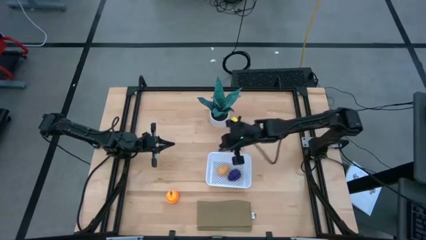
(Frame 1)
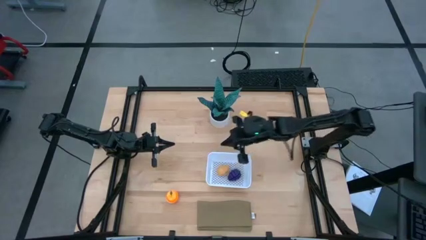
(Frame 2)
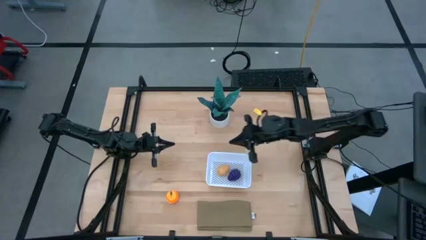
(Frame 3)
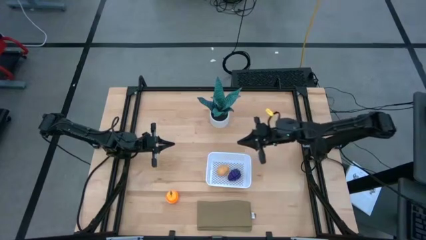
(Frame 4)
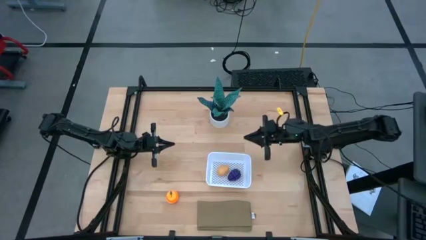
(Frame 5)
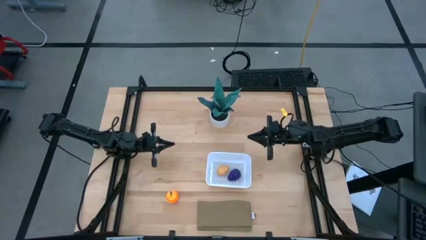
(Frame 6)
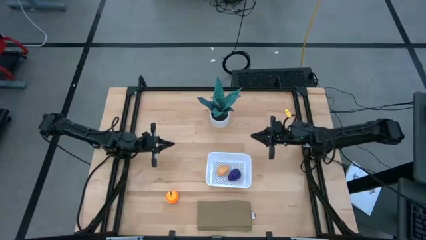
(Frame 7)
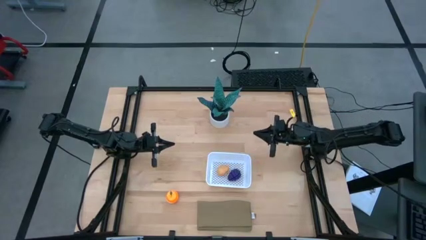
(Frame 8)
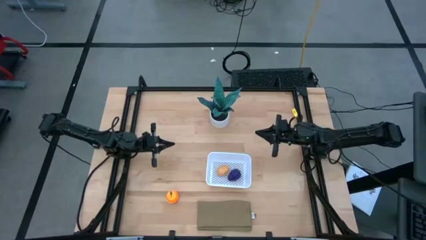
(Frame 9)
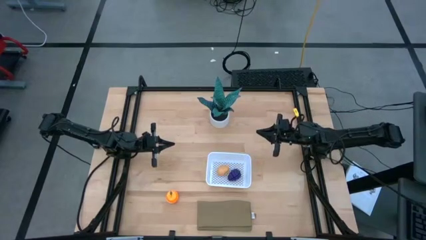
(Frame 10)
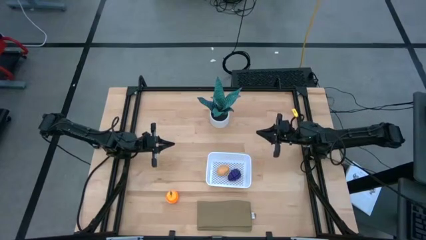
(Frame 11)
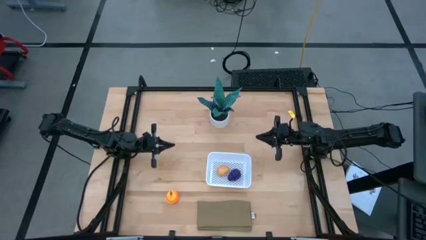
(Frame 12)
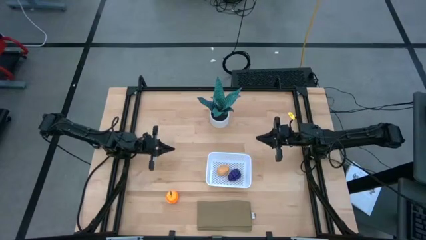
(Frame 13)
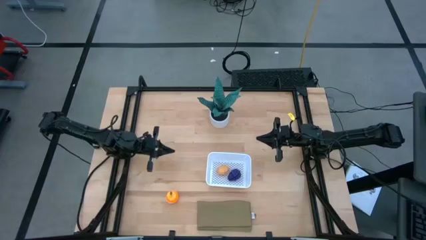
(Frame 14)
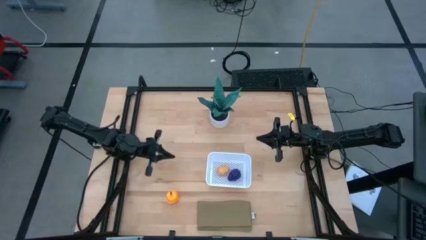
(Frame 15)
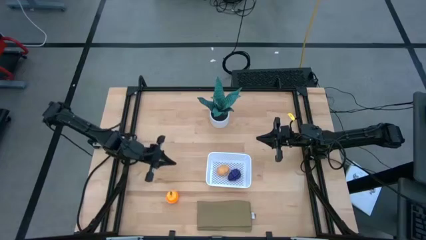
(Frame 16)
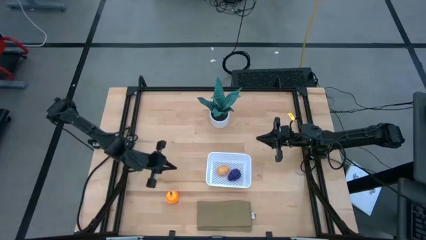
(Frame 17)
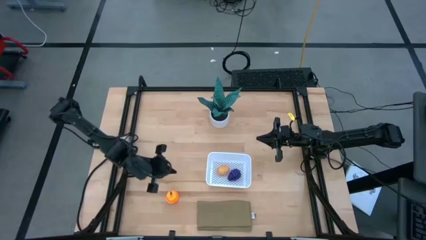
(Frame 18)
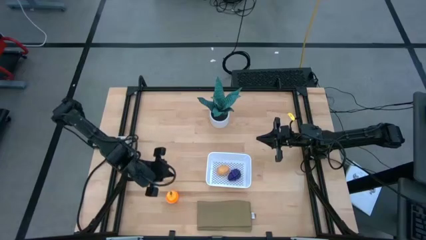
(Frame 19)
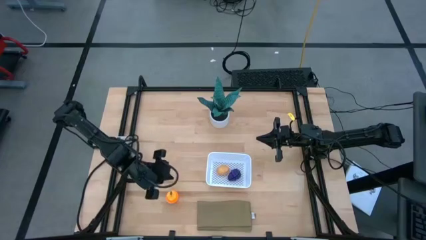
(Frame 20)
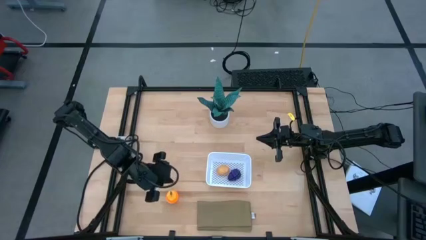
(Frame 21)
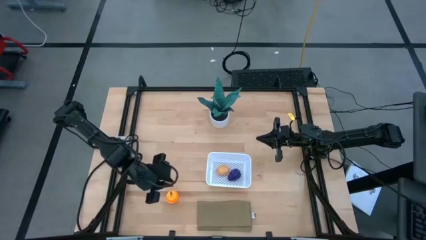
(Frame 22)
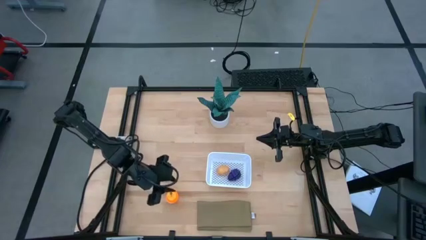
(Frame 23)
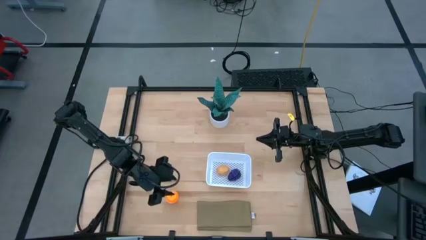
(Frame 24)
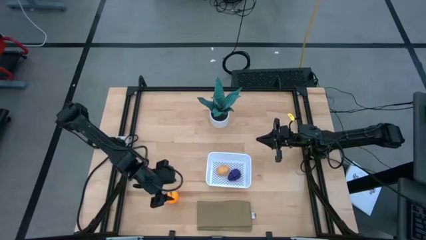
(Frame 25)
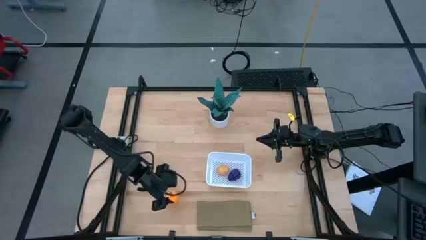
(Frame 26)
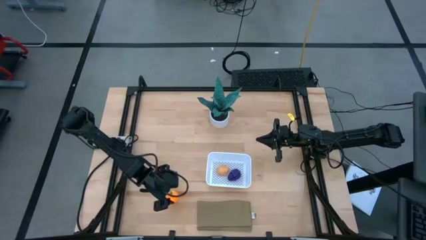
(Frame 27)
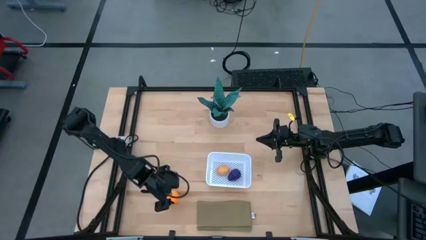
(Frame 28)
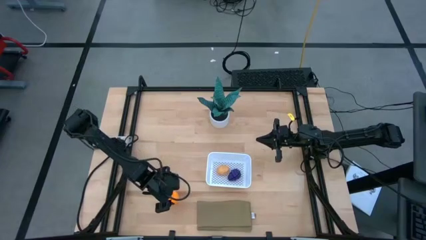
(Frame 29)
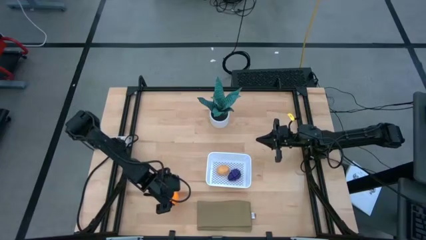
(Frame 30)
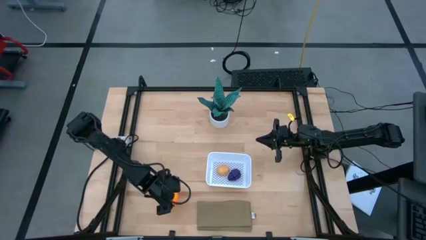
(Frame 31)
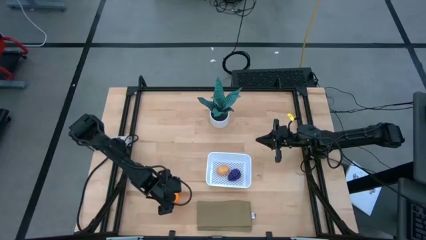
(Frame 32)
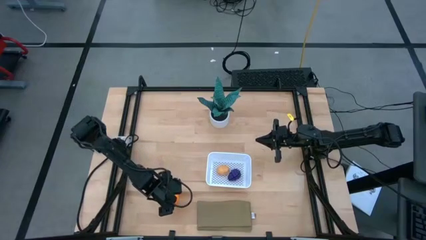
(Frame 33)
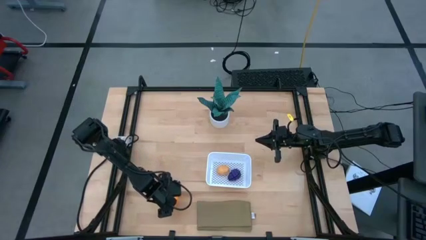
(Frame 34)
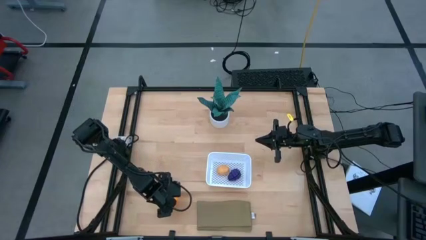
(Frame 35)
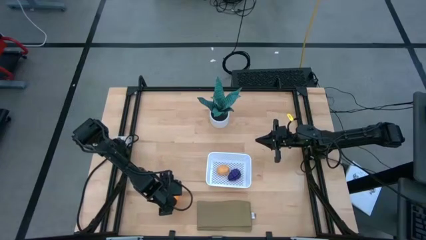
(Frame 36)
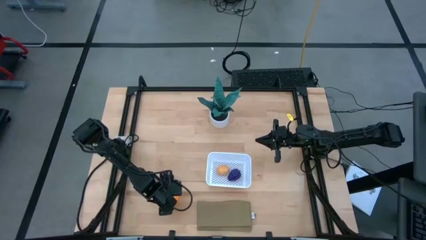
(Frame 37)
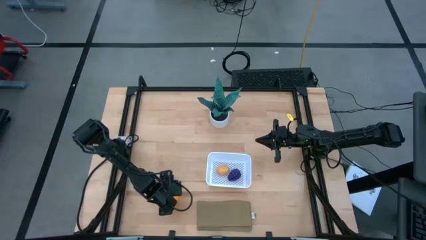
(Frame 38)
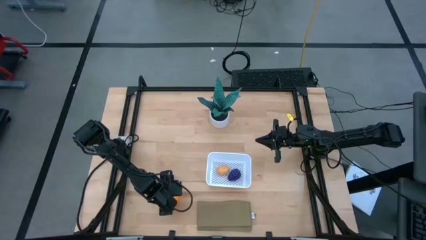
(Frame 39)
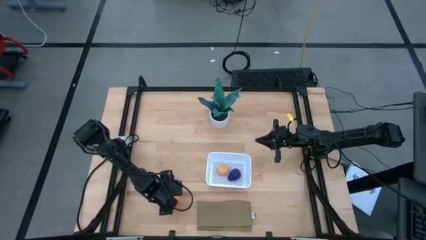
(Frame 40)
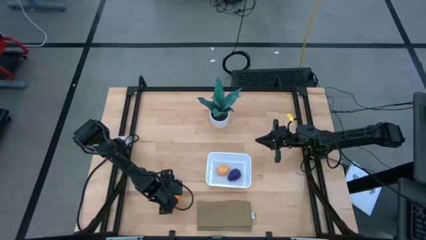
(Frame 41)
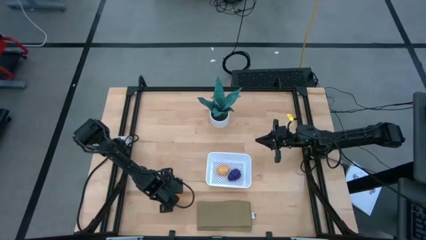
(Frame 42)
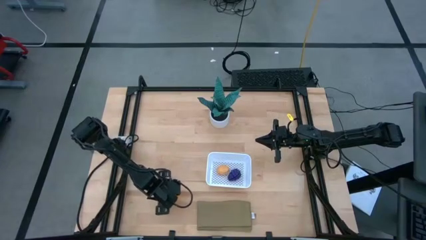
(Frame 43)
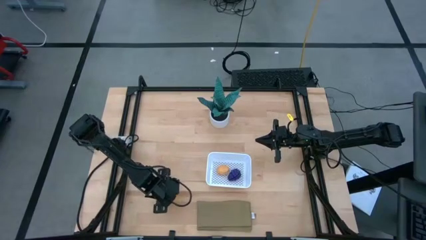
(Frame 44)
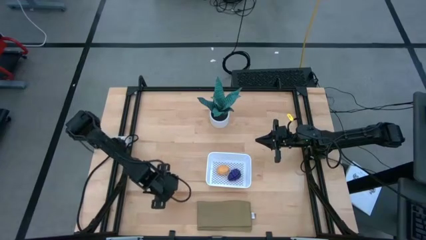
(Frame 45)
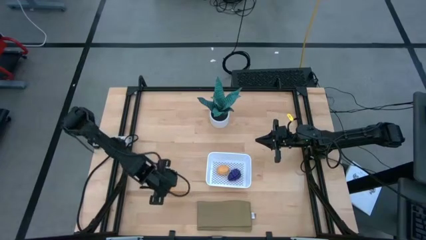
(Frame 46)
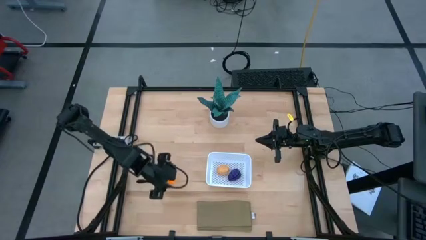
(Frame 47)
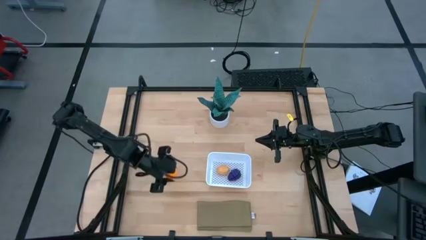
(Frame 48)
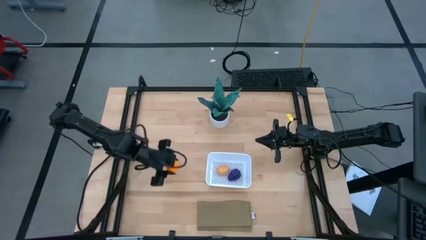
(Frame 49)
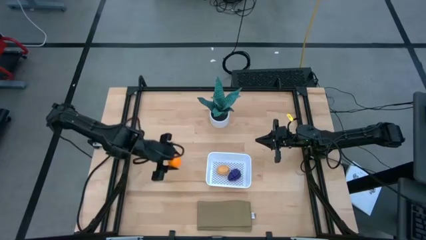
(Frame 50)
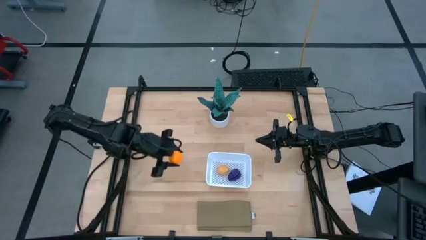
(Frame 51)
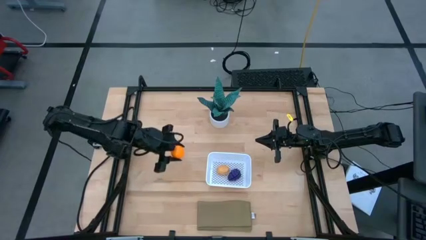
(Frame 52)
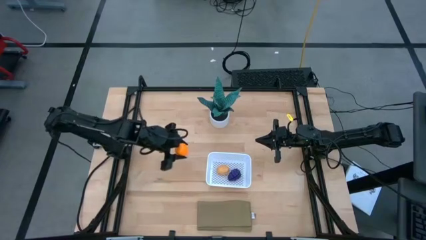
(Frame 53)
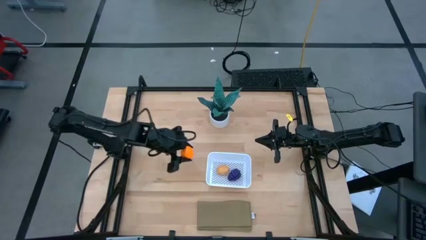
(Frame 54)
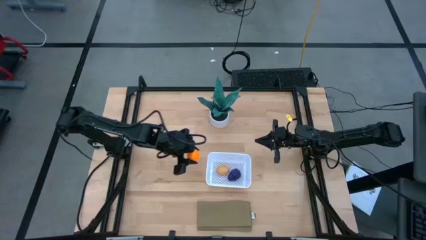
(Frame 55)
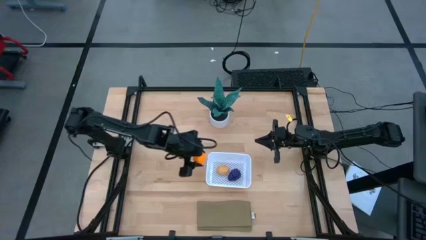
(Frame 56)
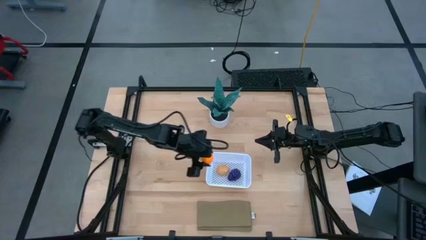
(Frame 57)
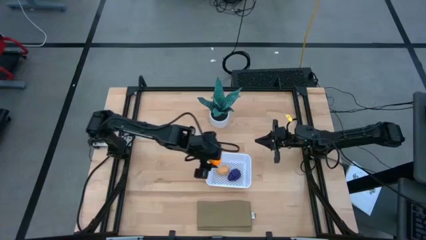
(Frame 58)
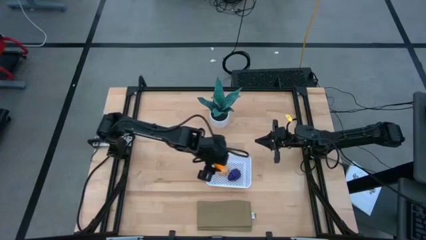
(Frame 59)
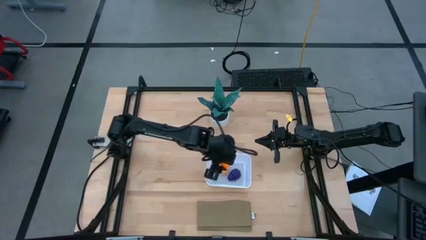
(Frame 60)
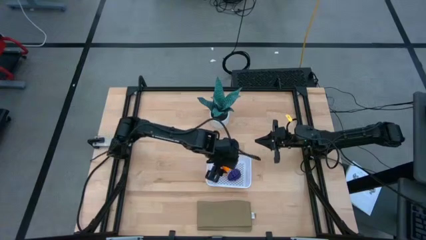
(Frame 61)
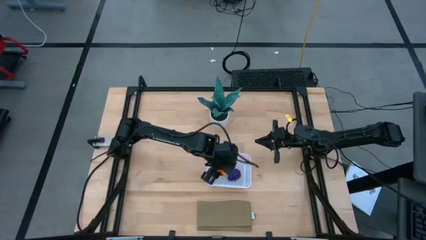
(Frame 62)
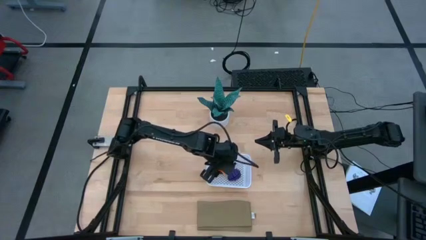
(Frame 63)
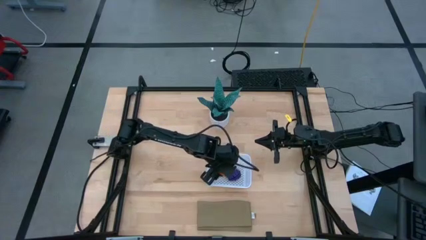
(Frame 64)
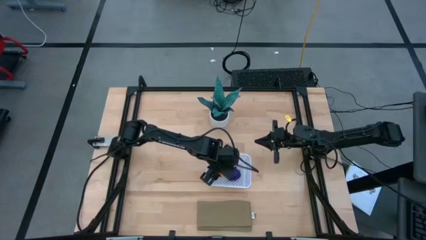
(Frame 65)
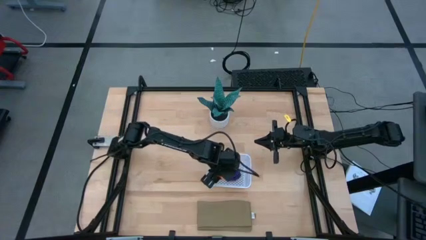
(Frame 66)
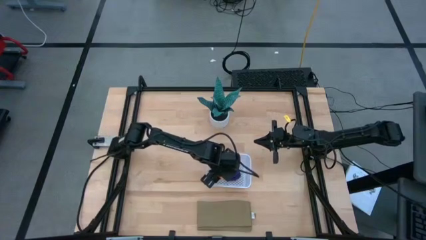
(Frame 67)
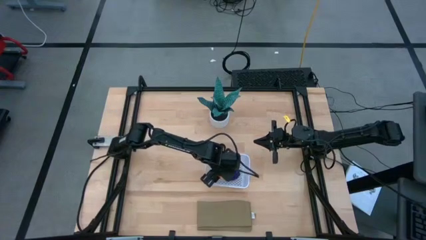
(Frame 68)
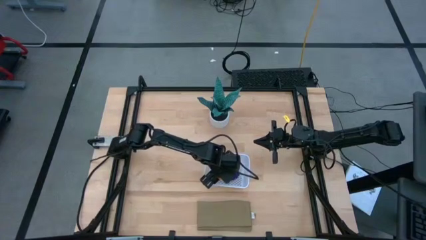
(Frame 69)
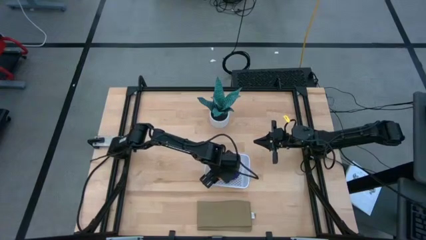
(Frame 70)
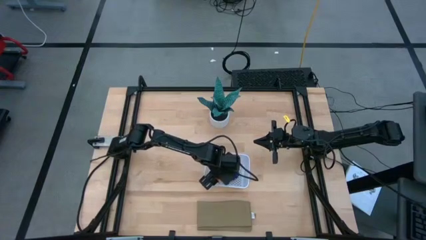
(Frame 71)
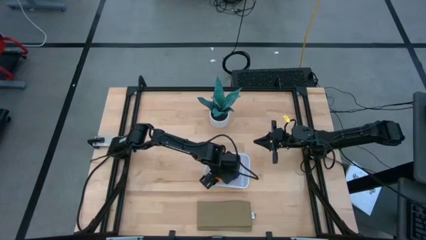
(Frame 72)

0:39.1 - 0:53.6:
Task: Pick and placing Produce into tupperware
Put the orange in the white bin

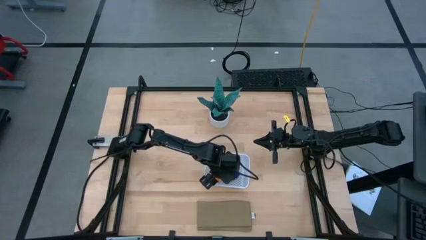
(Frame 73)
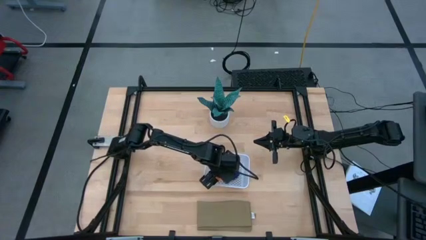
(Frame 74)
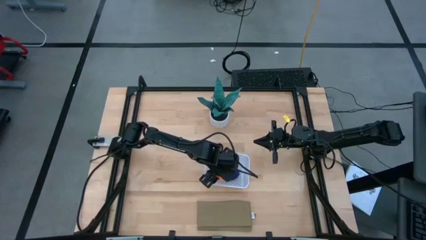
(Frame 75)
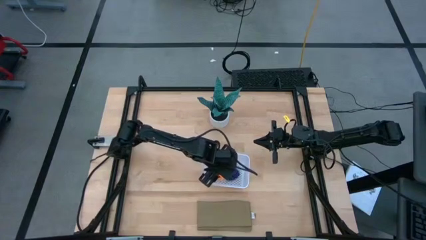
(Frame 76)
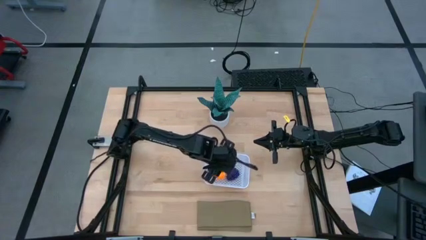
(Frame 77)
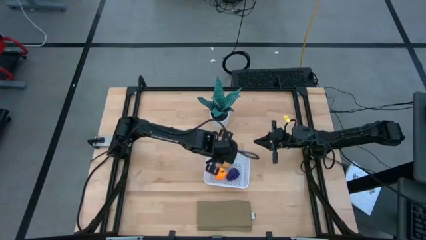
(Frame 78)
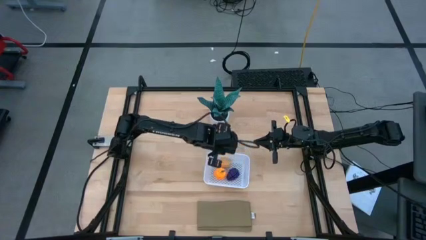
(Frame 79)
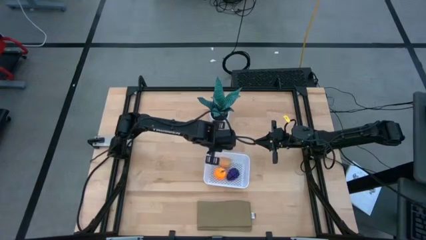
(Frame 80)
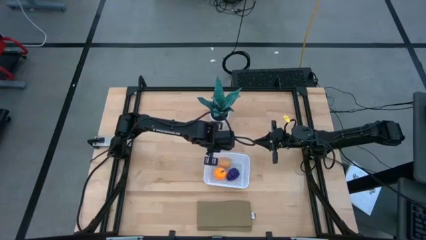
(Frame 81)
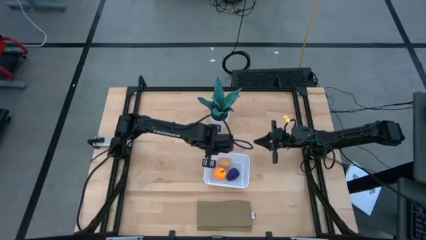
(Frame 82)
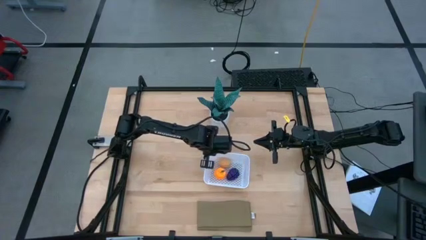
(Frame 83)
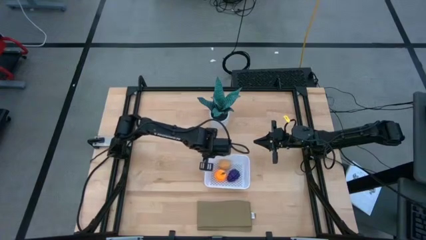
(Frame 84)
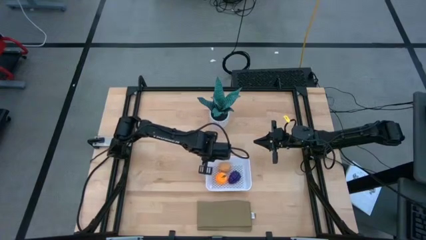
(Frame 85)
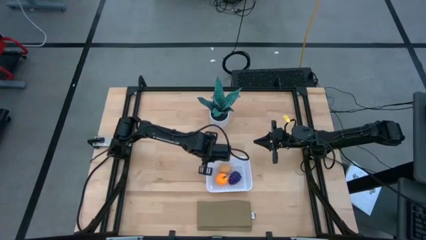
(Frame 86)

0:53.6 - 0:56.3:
Adjust the white bin
